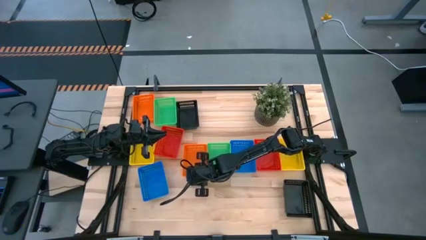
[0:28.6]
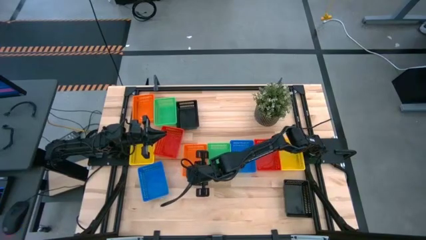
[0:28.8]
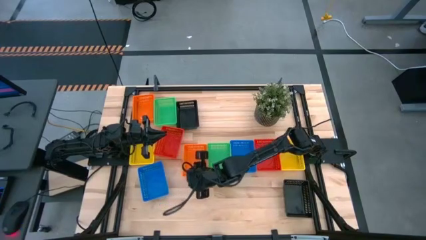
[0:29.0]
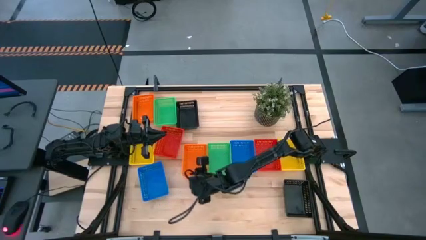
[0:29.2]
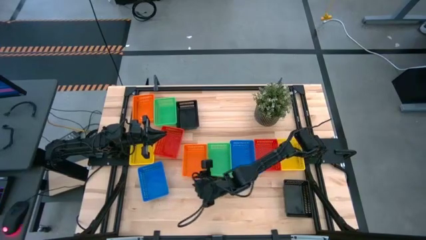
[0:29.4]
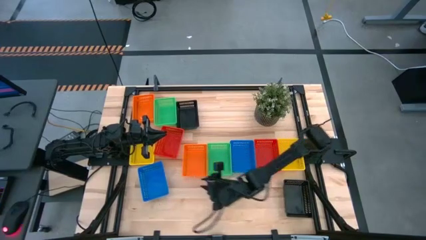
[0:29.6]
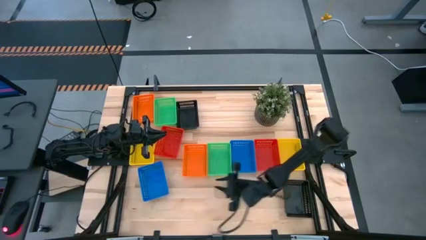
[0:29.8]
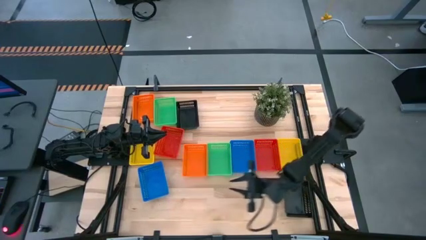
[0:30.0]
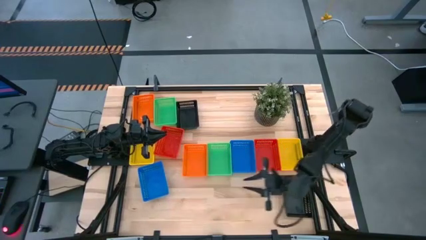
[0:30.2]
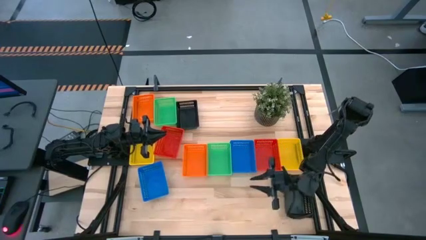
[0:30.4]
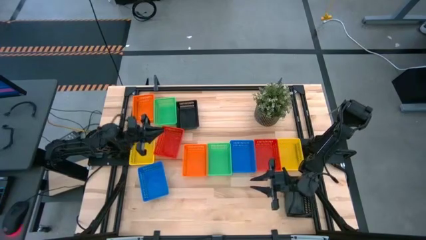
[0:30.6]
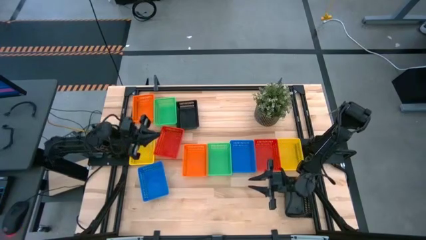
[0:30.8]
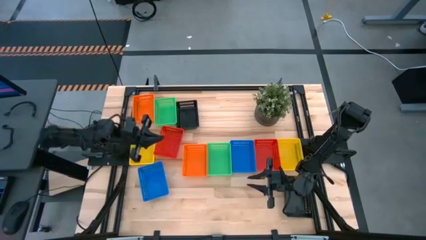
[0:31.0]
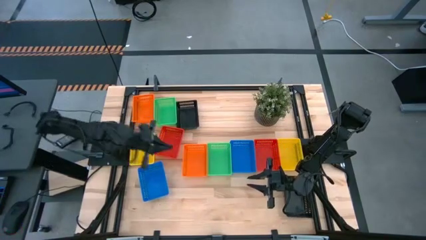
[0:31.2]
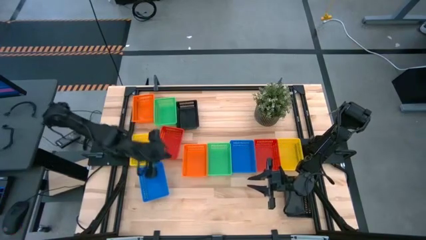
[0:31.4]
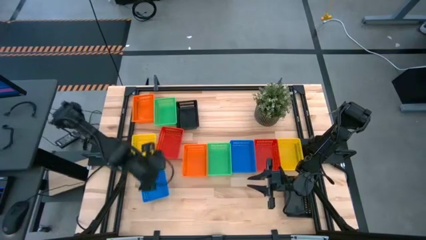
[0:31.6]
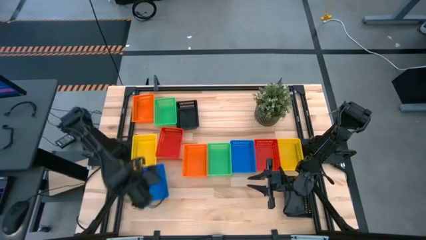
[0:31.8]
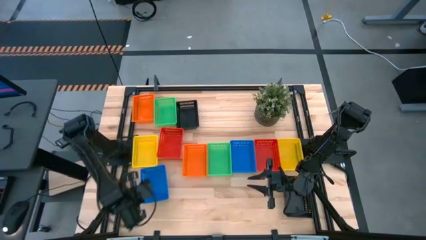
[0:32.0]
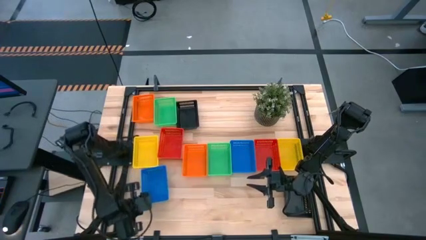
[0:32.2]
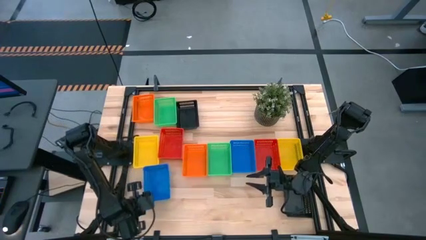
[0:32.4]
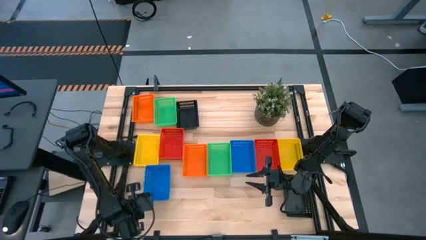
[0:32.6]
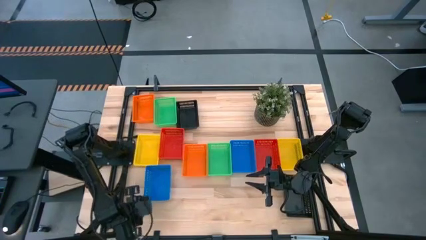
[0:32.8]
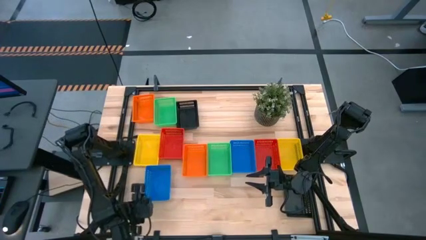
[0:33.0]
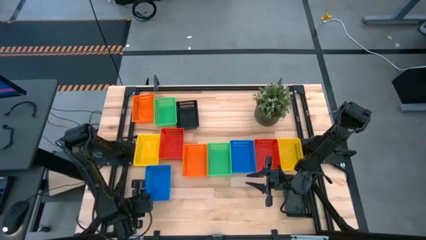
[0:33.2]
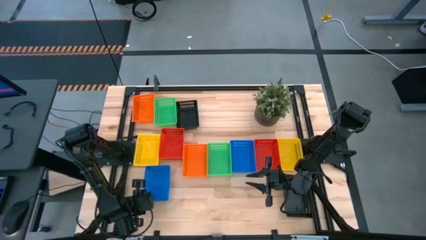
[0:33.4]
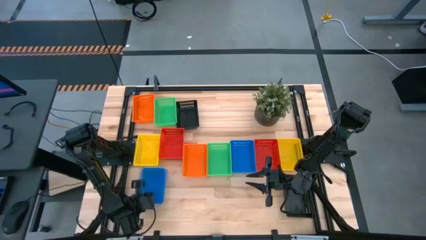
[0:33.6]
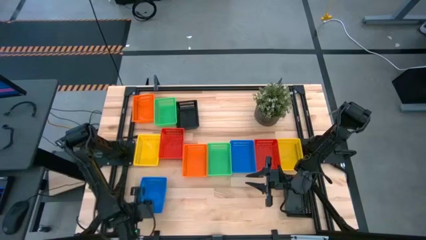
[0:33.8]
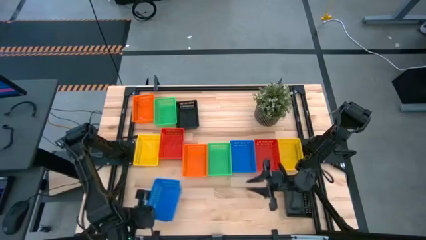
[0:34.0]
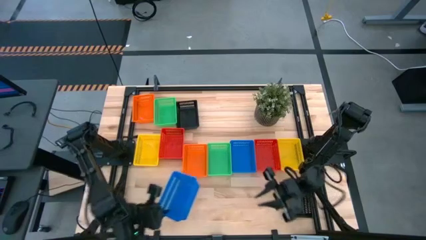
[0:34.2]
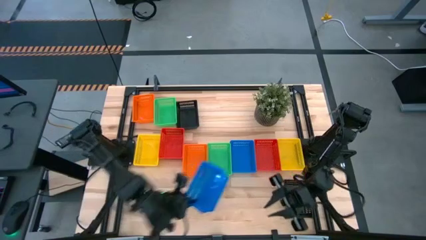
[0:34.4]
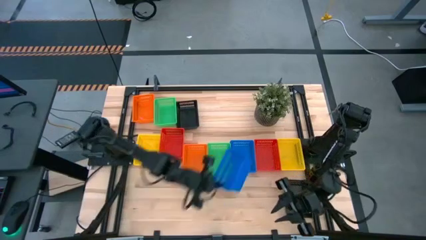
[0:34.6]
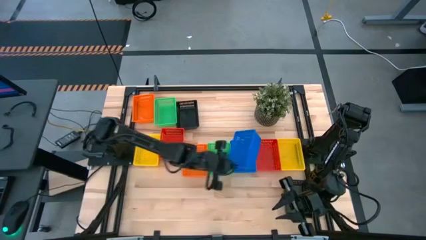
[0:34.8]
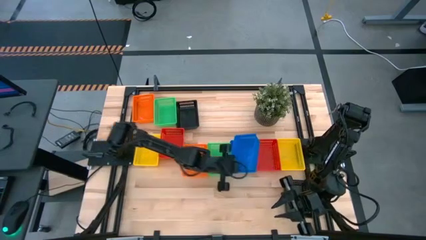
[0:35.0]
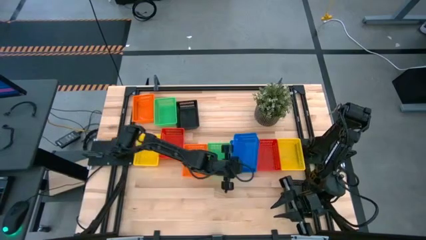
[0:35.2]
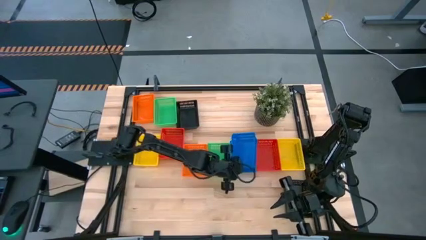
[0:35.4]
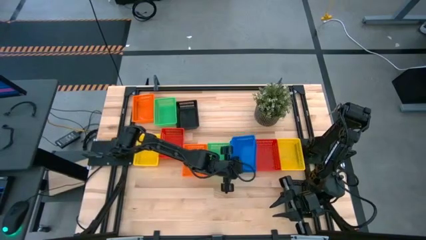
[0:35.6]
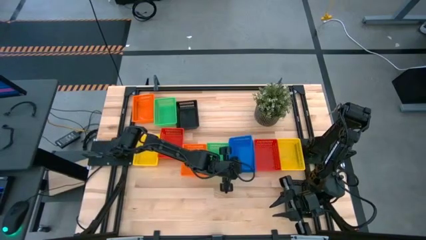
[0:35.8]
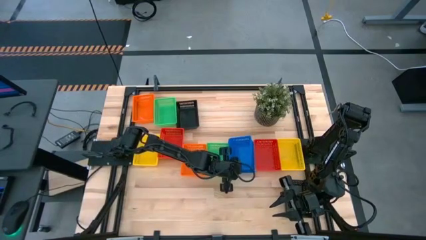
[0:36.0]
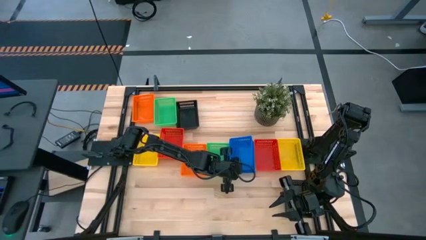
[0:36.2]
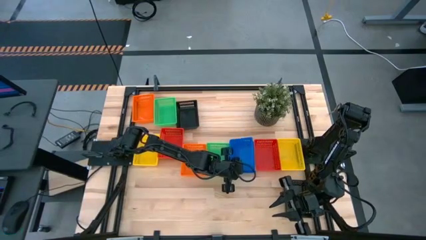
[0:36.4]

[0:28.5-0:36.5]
Stack the left blue bin on top of the right blue bin

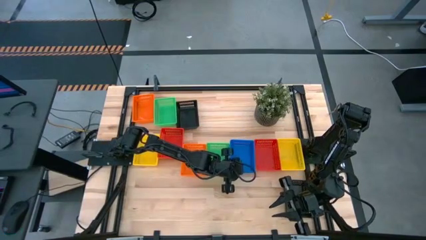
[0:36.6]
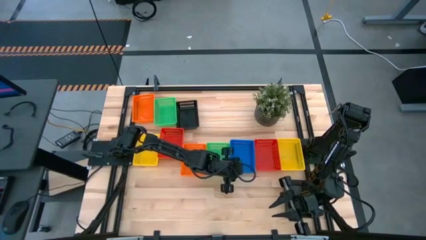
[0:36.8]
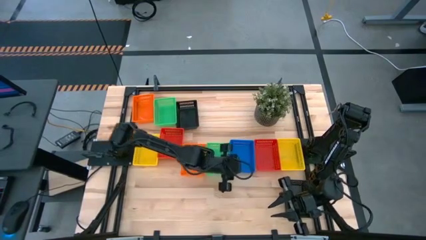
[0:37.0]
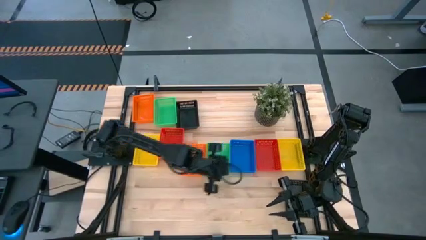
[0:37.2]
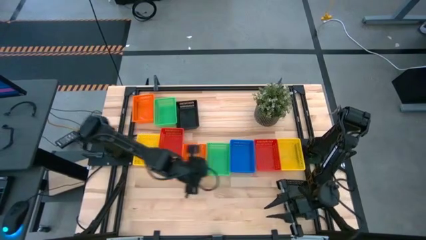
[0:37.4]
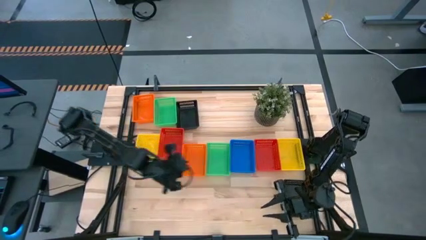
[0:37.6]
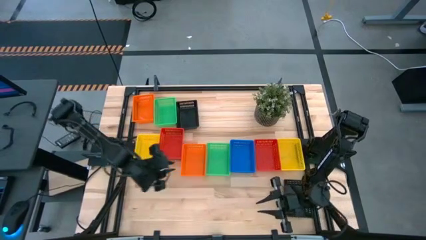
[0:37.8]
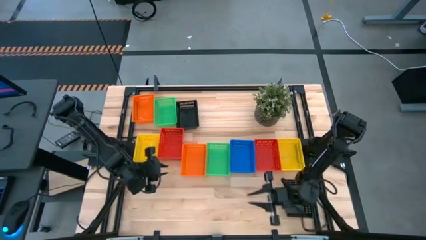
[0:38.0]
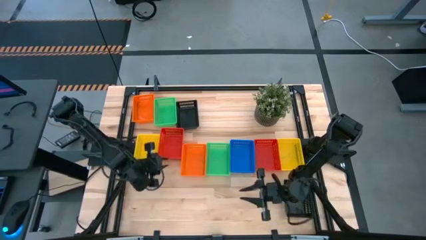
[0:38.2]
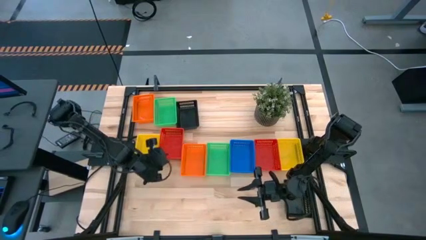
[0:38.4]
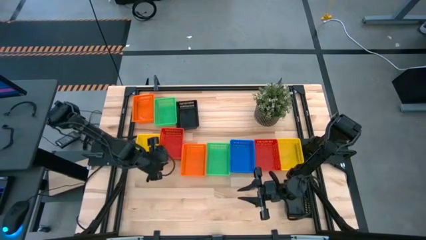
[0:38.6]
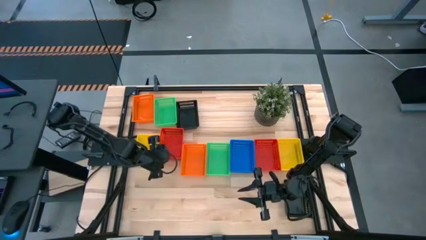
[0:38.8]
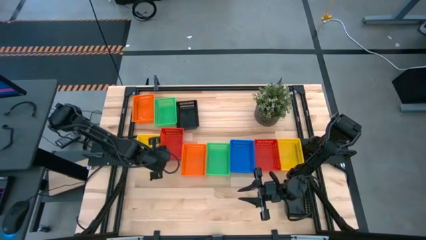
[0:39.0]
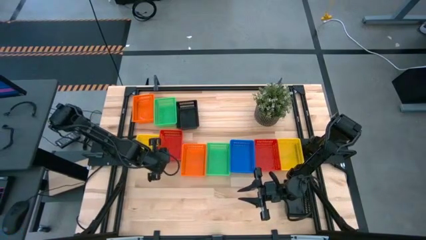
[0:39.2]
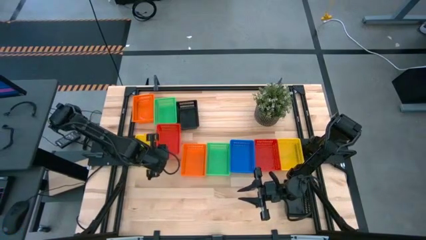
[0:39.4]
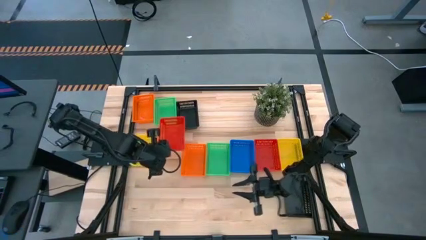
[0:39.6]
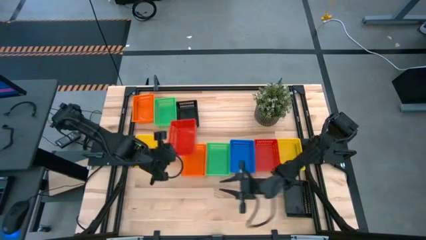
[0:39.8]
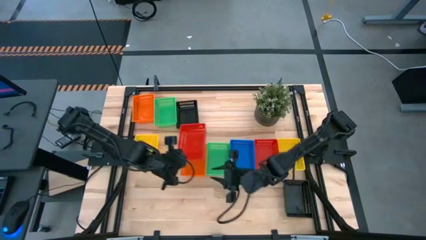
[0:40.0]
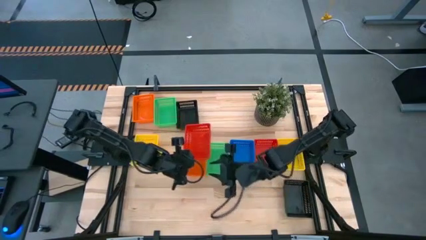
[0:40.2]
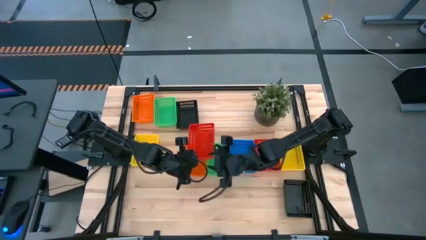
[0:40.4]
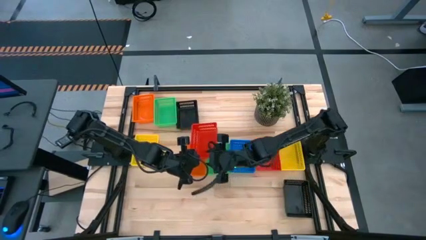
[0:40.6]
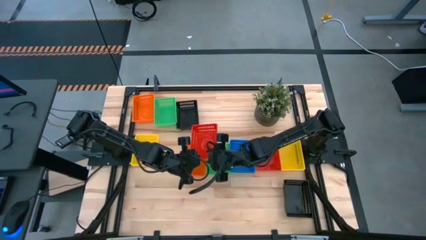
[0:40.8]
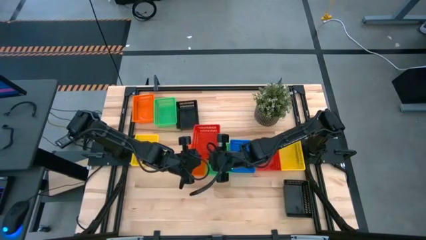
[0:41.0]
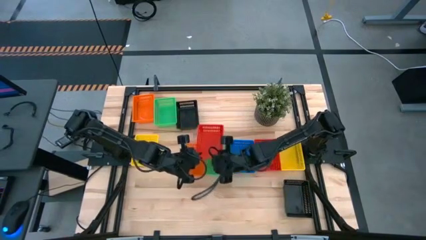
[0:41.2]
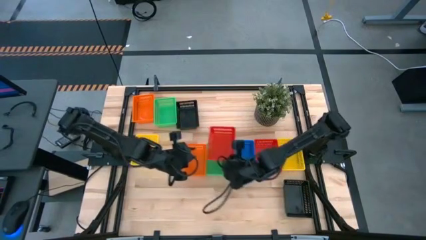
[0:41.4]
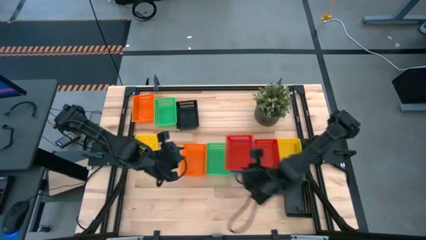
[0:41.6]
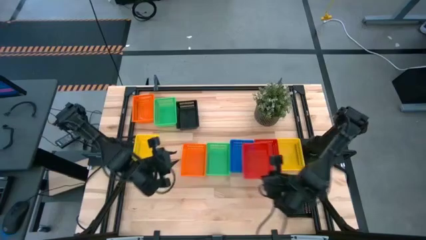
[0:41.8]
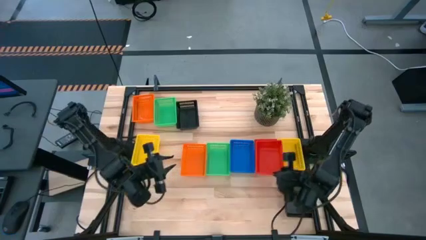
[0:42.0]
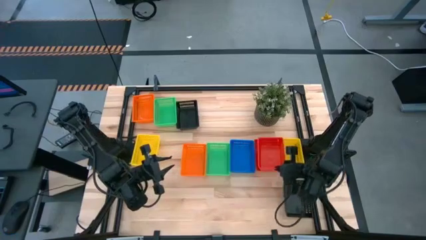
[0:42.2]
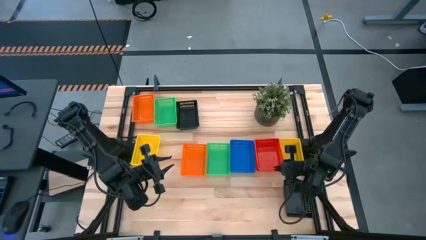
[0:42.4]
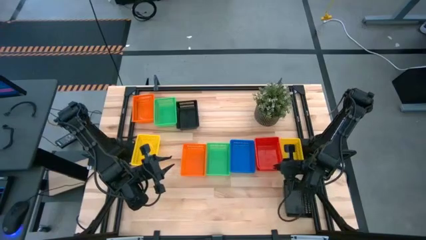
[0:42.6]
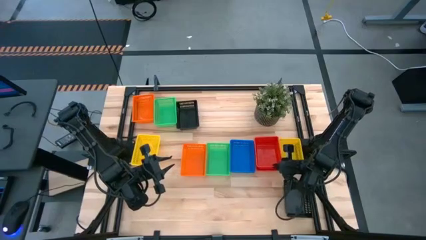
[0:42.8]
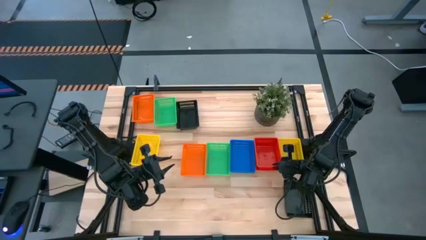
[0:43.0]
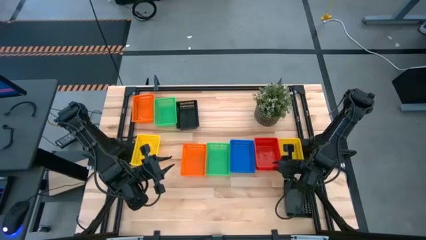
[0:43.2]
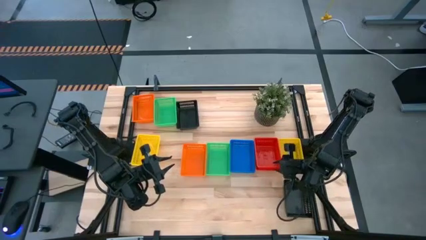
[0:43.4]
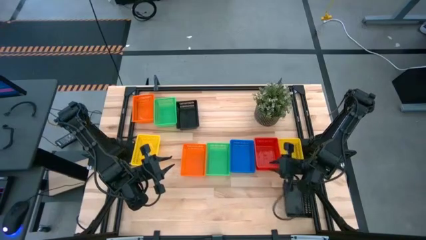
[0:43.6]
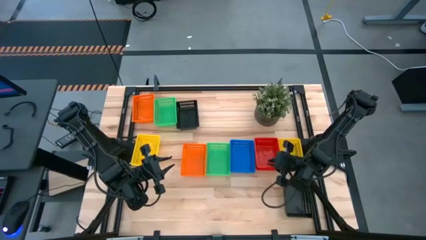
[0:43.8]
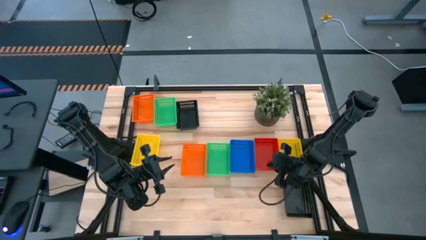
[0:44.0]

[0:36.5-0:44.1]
Stack the left red bin on top of the right red bin
